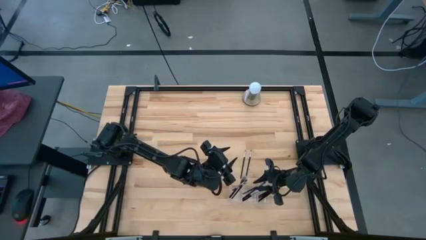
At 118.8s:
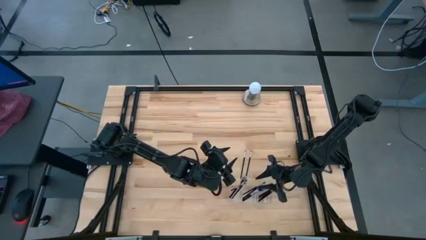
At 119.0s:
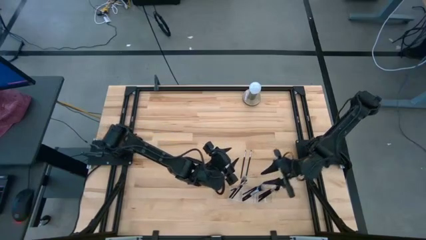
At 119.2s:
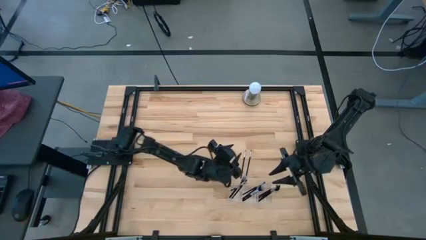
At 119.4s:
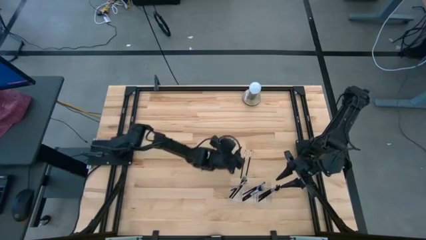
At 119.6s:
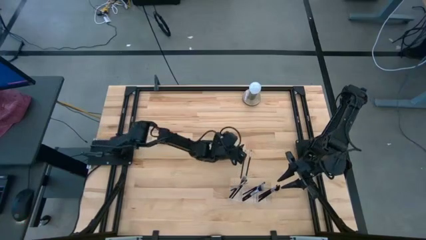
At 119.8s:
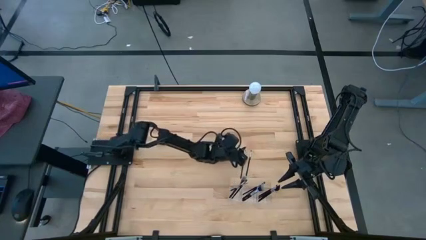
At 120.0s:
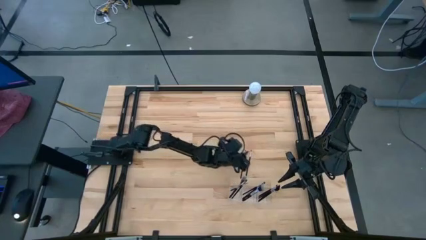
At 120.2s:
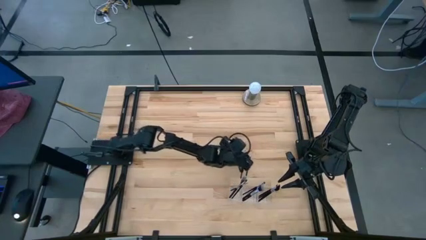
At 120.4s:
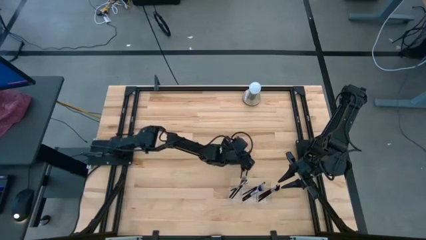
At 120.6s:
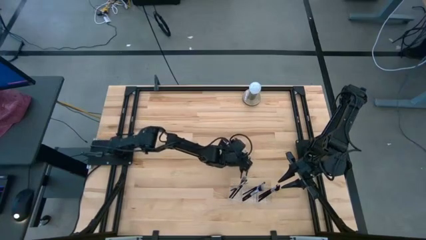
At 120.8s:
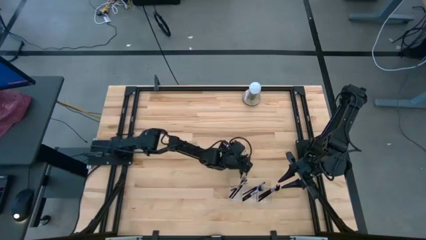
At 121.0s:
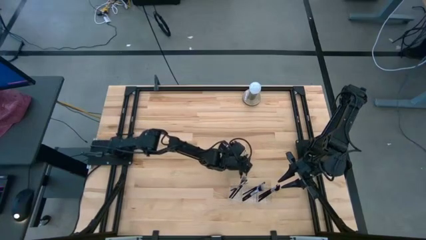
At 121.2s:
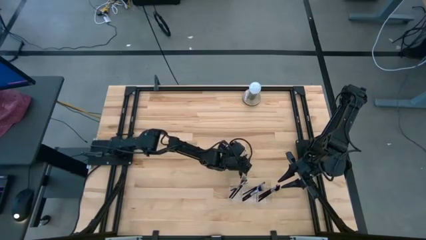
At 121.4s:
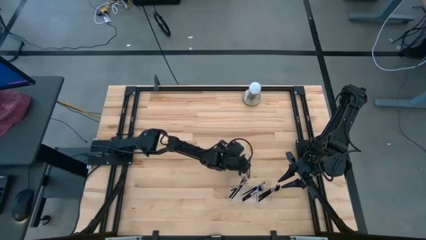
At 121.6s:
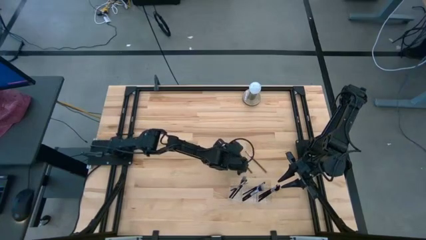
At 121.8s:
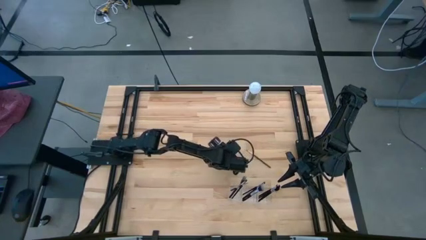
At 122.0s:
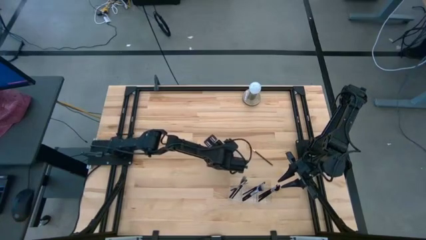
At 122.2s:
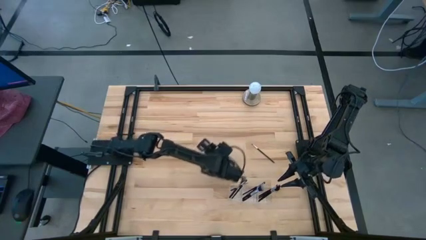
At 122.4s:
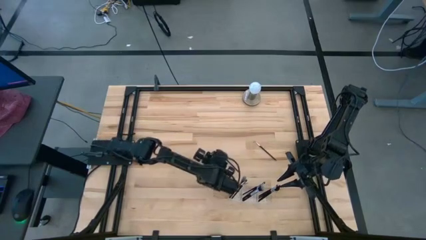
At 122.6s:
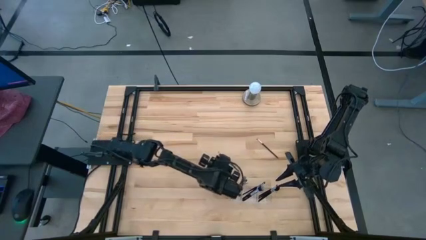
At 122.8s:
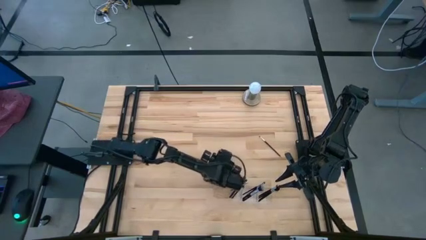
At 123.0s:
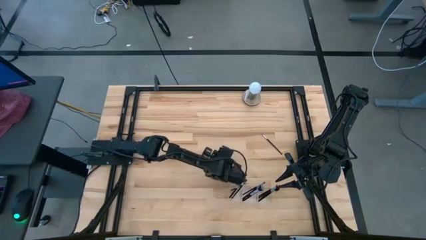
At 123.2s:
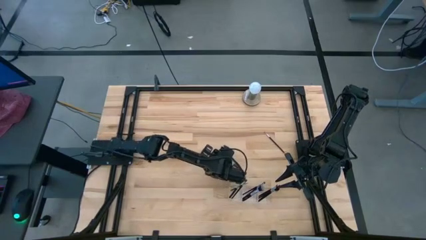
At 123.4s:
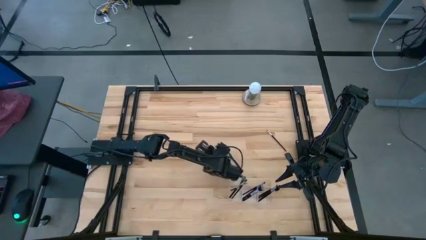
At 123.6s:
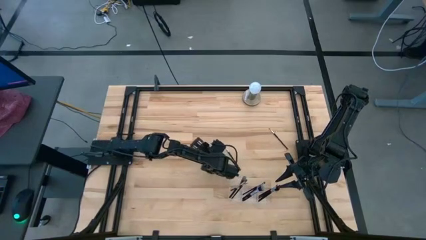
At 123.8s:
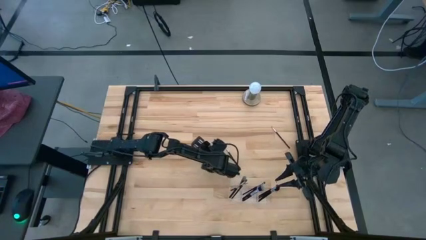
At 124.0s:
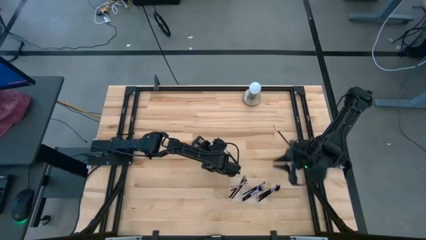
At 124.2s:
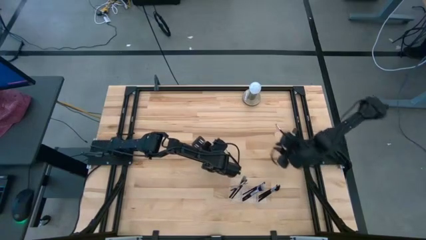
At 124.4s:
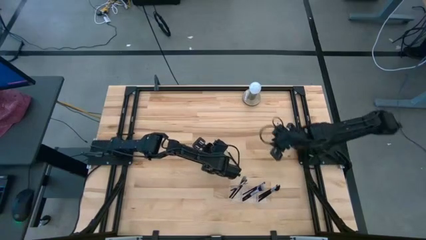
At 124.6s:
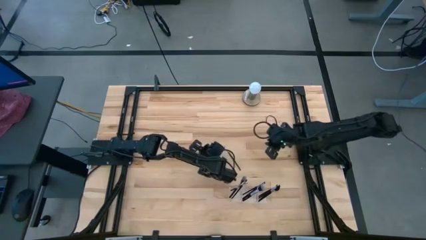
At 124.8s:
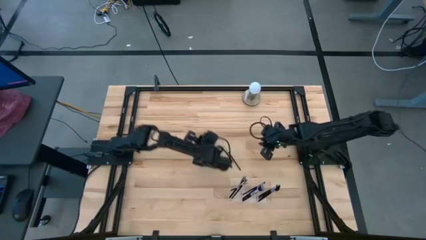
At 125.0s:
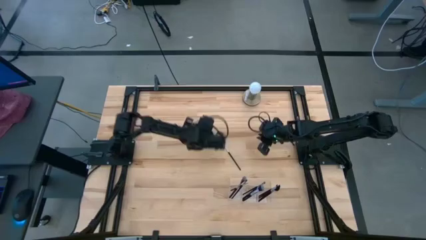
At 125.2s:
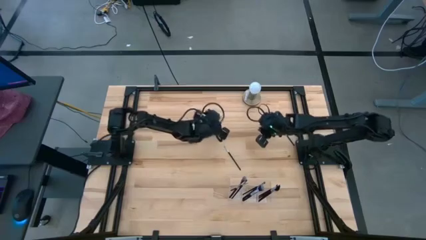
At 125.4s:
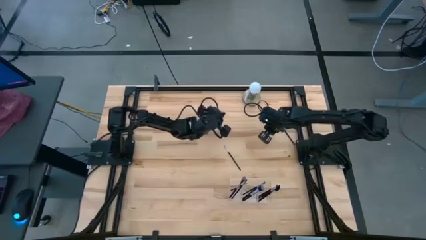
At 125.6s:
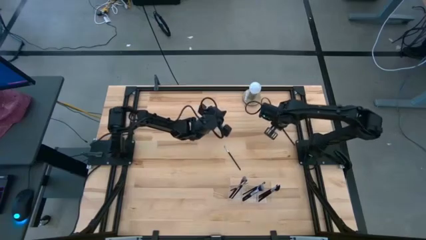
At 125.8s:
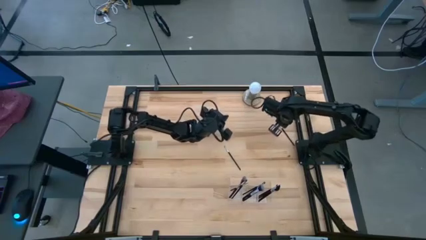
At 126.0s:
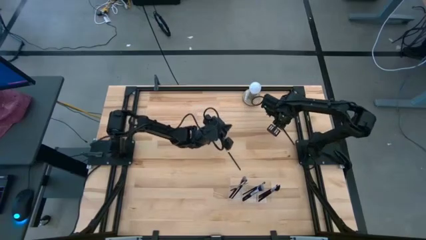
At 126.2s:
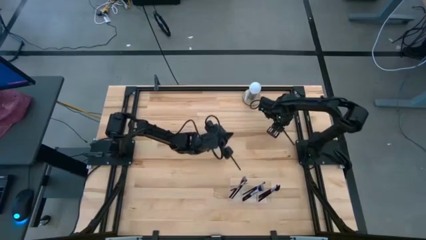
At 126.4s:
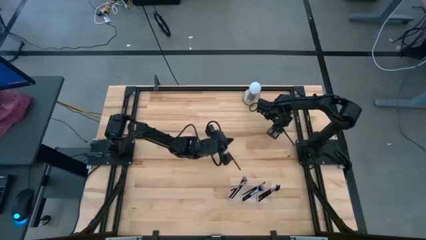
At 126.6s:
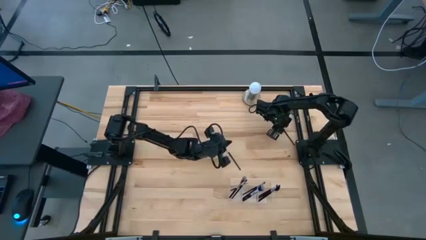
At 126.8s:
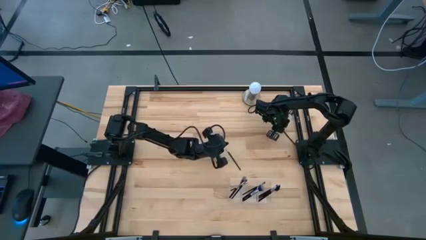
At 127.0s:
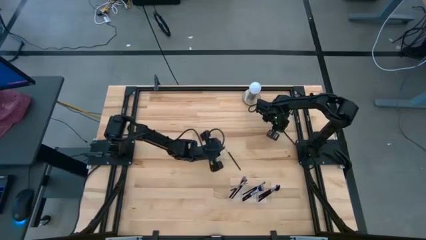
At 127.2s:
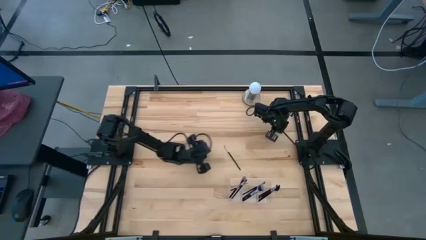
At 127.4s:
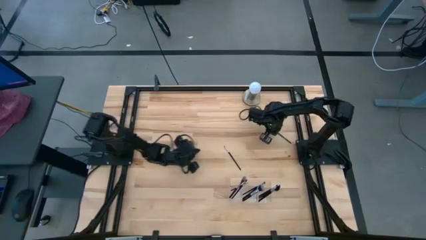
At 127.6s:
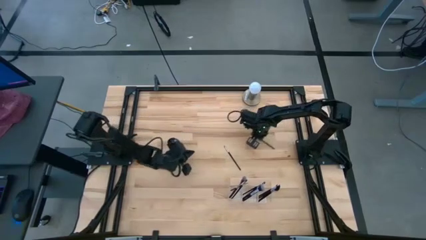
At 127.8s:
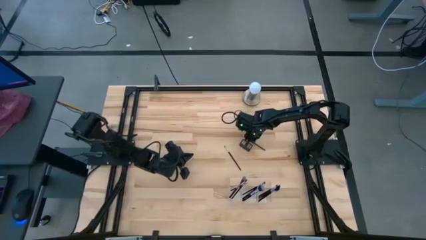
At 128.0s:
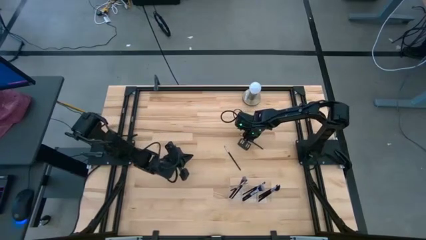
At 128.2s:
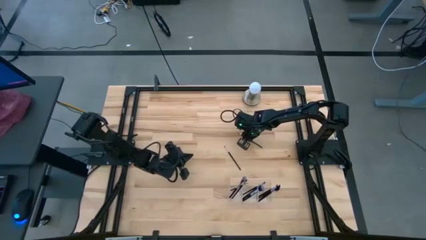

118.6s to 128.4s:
Task: Put items in baskets/containers
Put the eyeshadow brush into the middle section of the transparent organizer

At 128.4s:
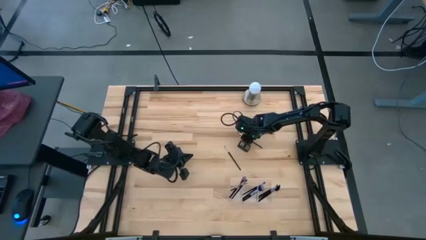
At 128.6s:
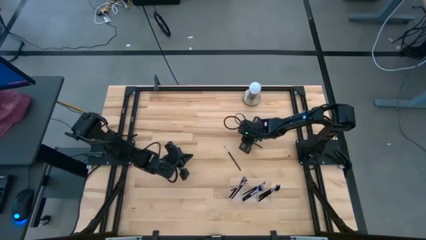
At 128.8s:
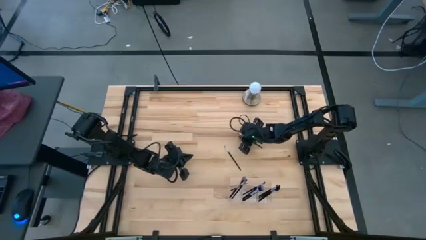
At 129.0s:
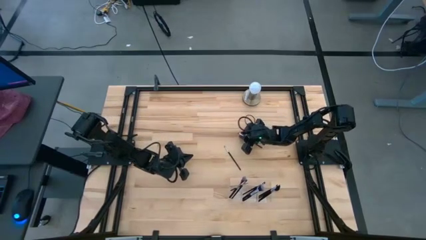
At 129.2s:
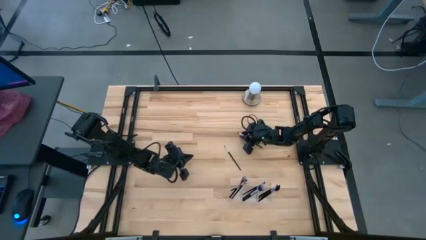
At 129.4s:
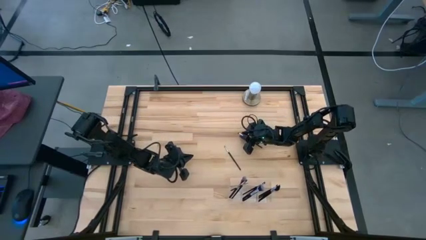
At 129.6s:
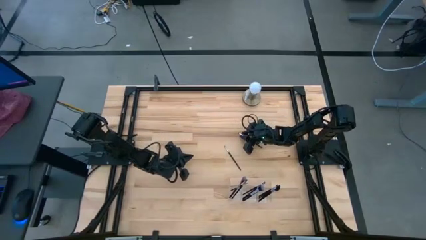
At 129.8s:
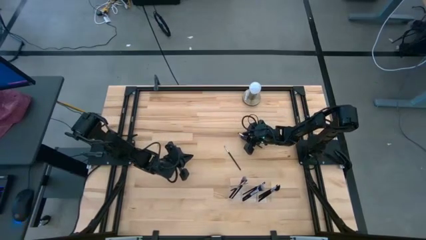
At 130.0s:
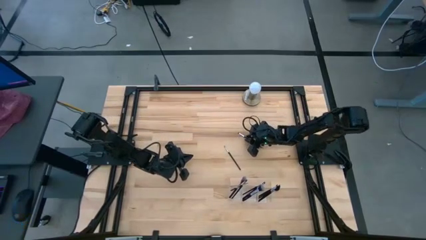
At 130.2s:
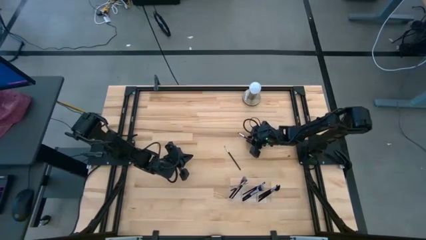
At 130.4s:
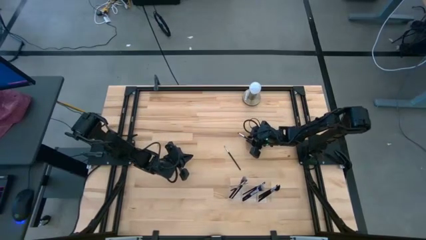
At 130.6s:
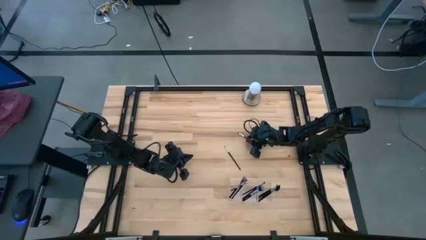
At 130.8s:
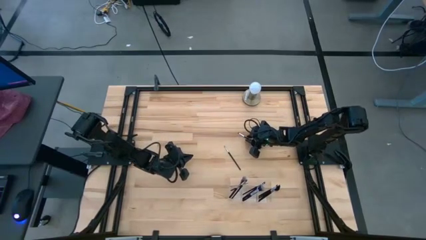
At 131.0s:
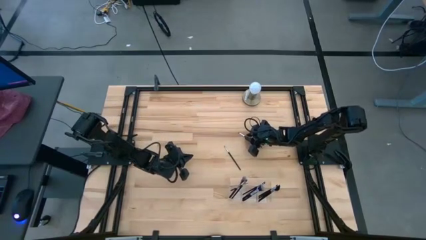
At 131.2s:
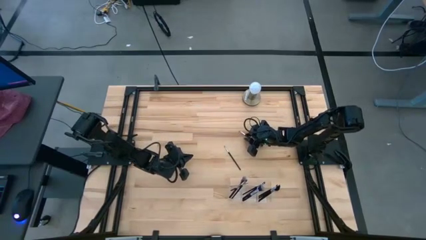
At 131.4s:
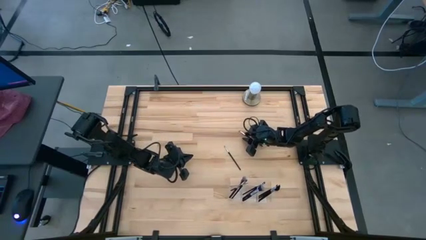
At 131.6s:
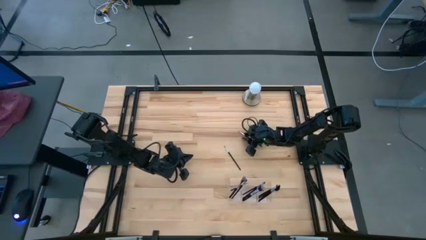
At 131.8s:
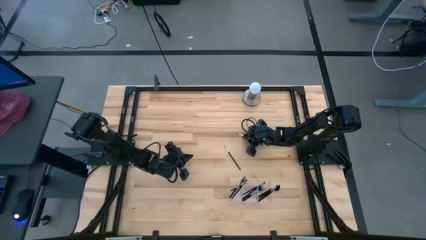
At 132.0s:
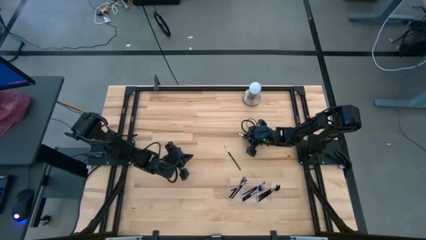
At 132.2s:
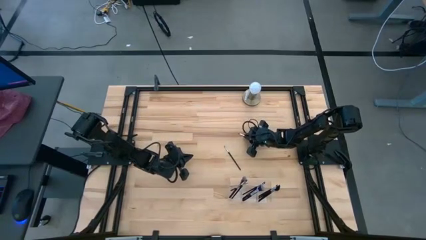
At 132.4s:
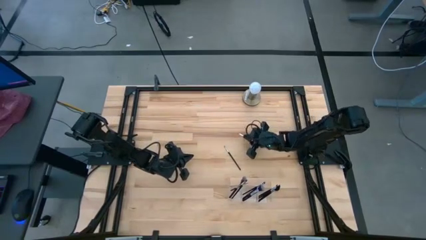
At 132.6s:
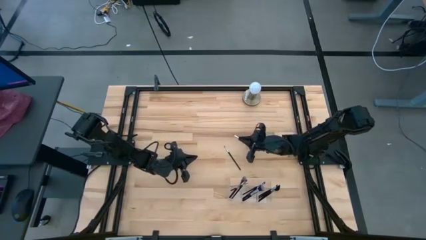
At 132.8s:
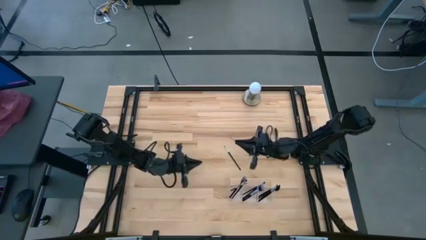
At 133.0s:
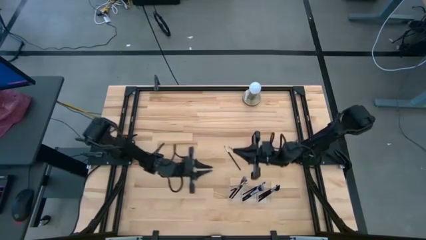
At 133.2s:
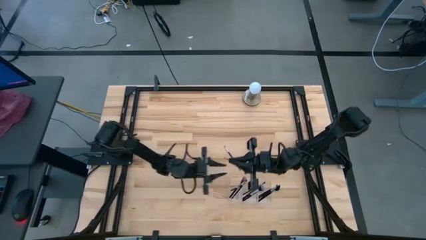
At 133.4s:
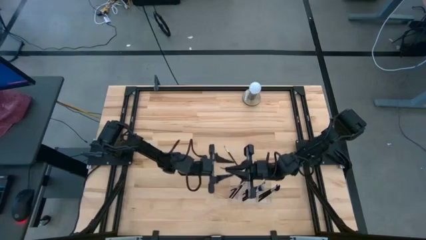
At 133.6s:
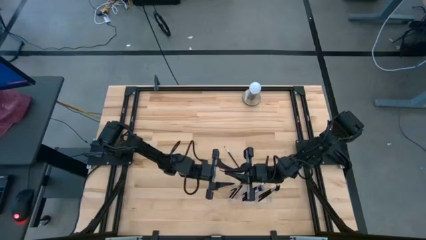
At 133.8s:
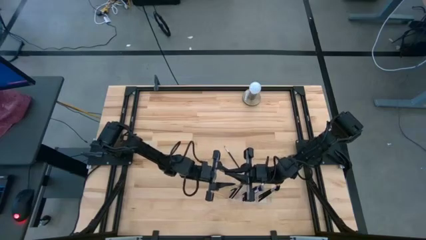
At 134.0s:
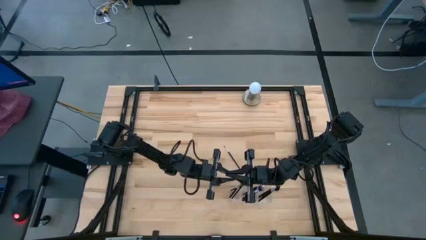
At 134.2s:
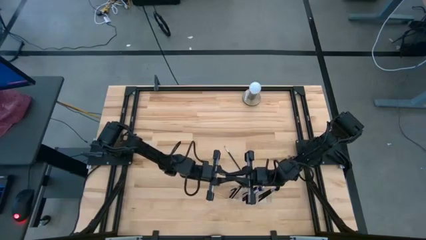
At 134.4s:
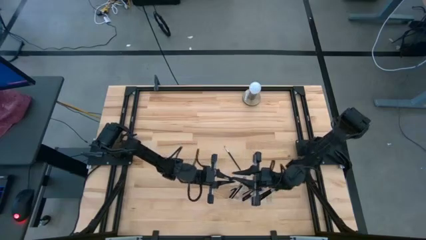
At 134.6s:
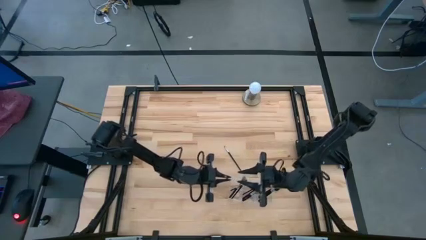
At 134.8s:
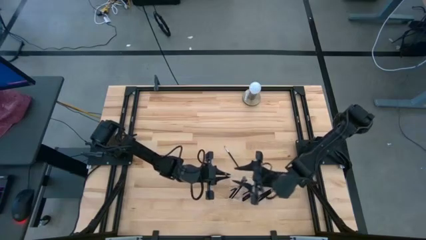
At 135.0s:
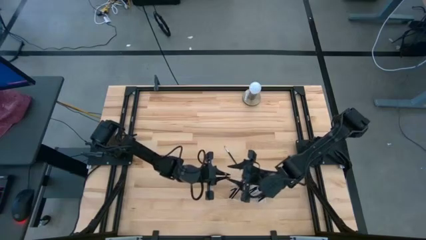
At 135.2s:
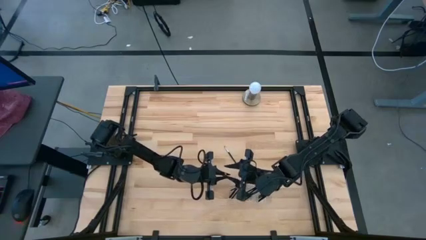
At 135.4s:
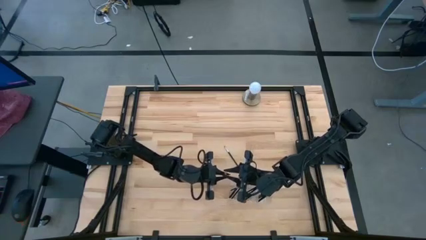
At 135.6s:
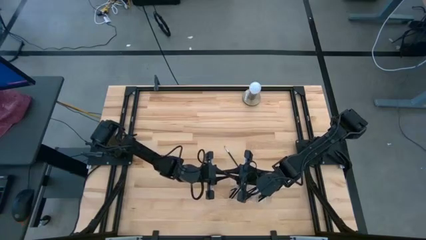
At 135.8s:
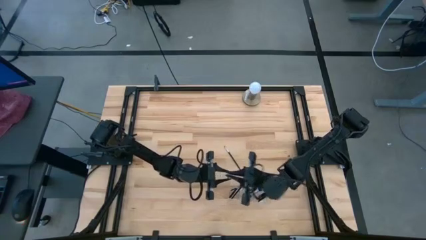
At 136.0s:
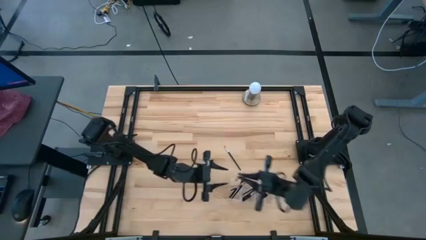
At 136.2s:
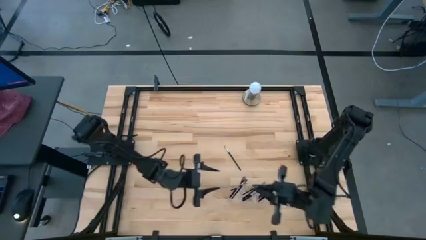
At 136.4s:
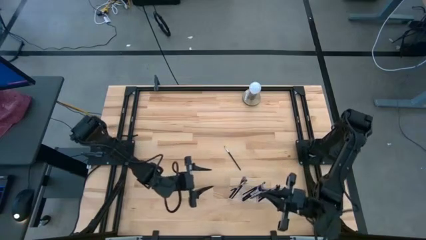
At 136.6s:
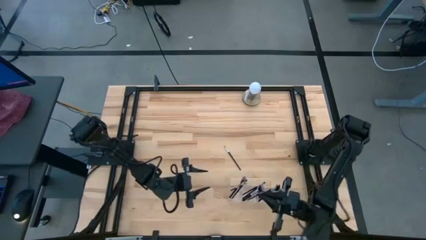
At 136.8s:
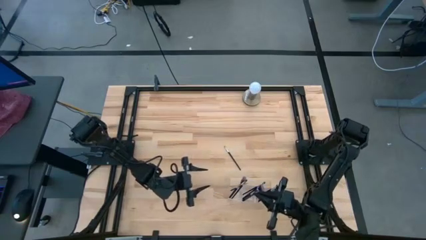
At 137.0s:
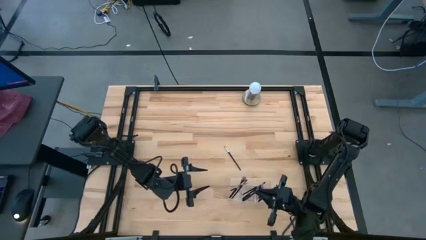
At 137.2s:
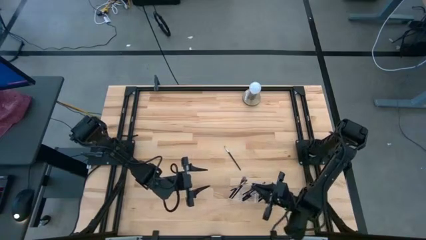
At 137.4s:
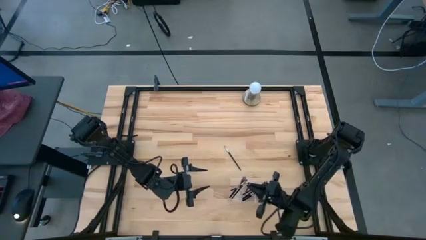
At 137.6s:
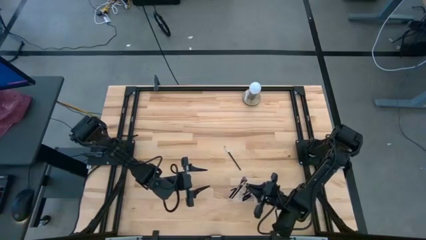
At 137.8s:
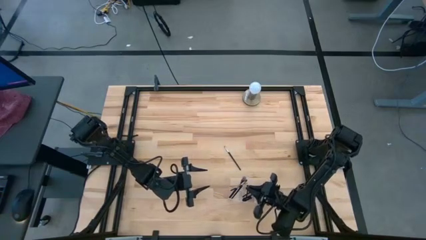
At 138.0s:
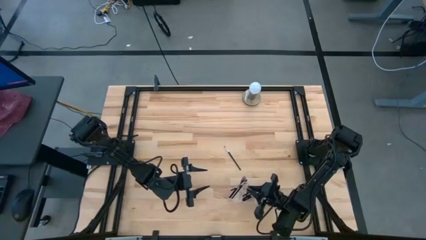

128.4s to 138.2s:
Put the eyeshadow brush into the middle section of the transparent organizer
